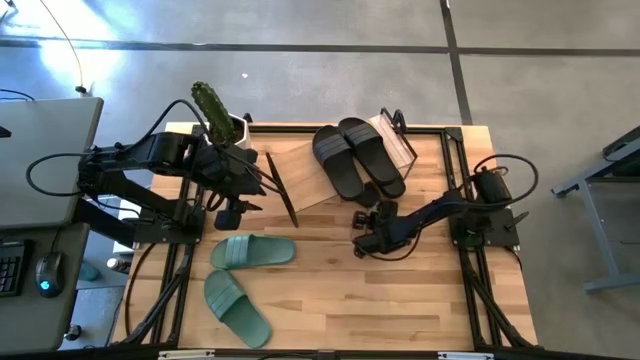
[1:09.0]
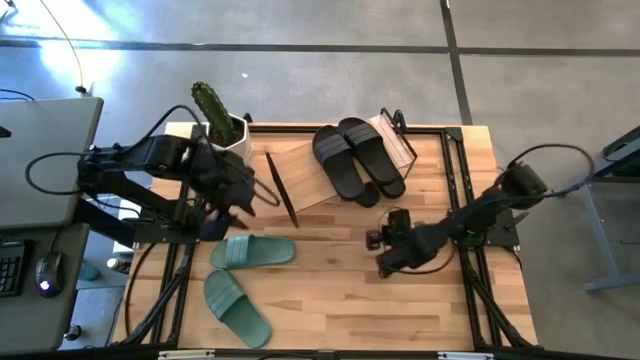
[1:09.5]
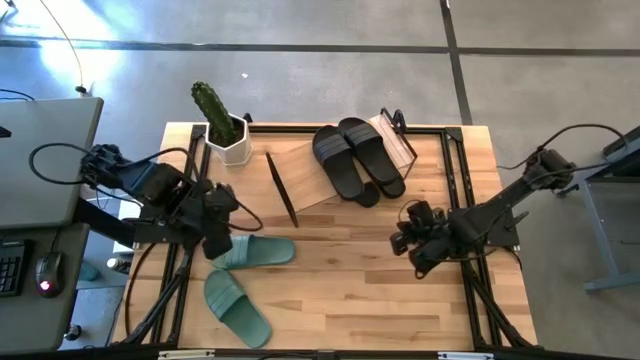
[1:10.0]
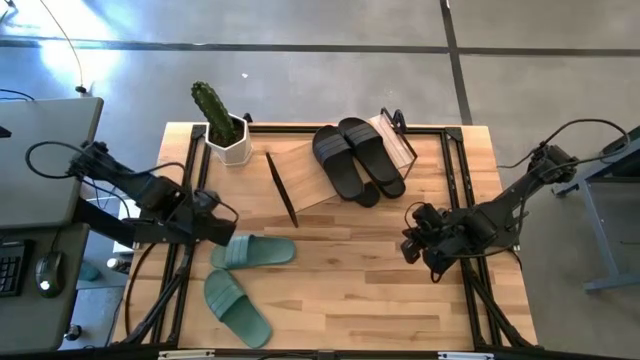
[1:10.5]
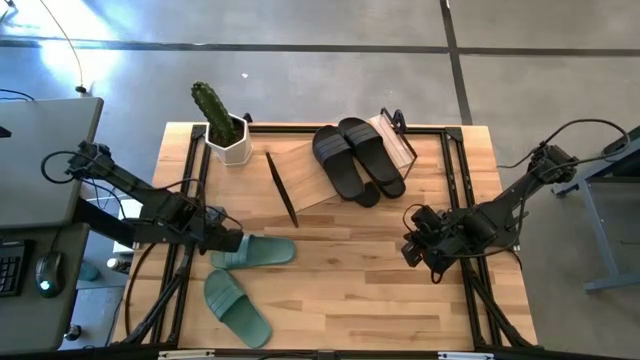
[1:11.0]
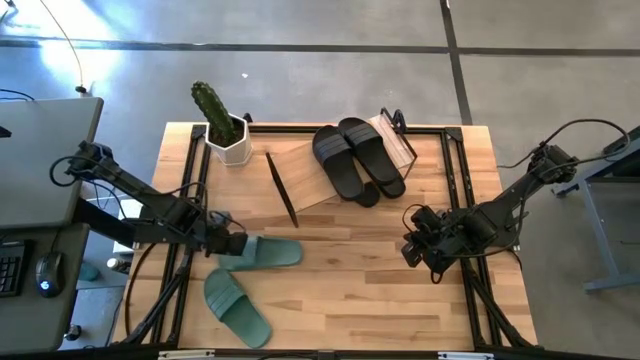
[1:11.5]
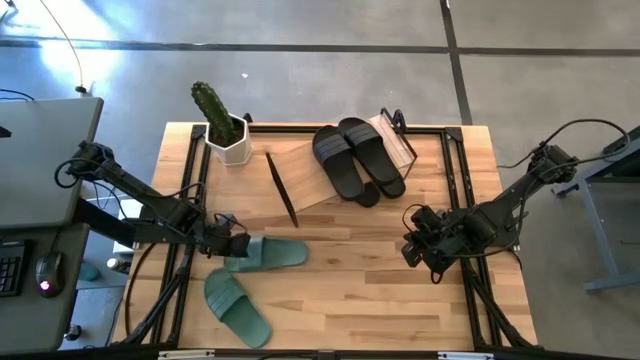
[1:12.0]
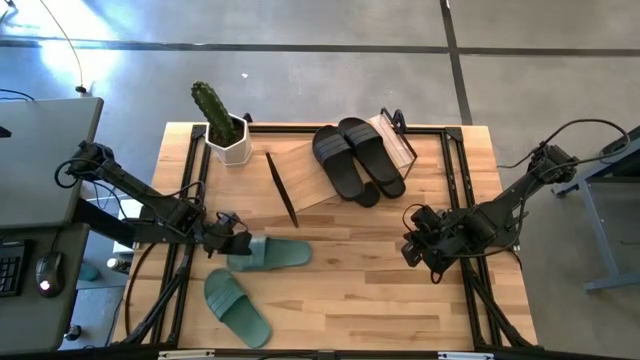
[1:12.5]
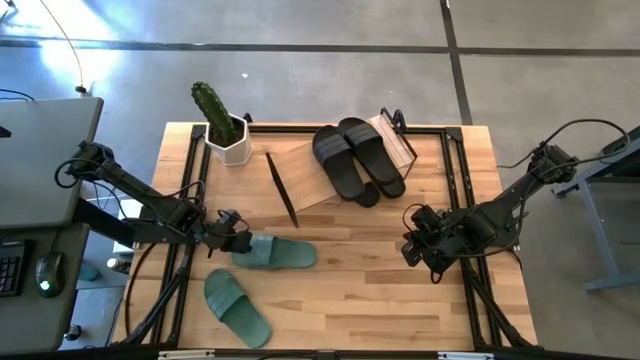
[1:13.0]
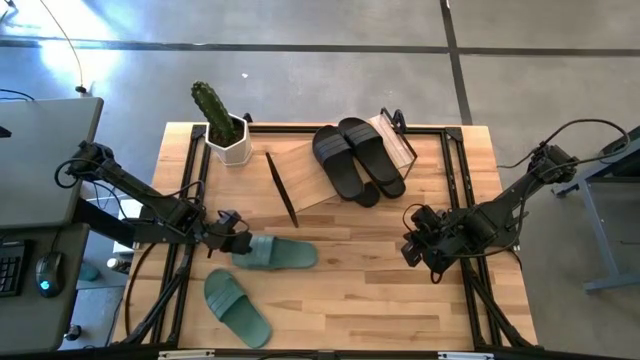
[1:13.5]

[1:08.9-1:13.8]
Task: Pick and place slides into the shelf
Put the green slipper under the shelf

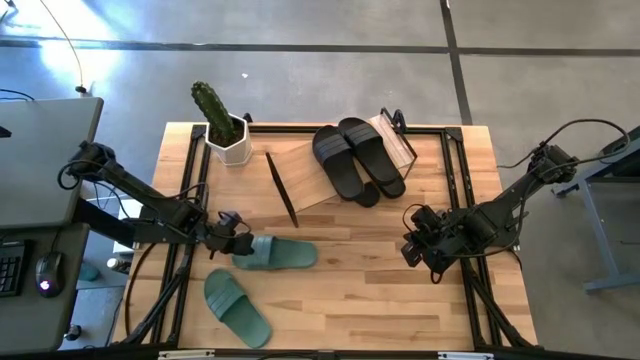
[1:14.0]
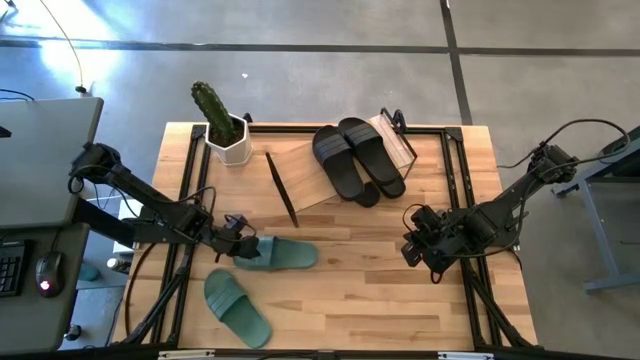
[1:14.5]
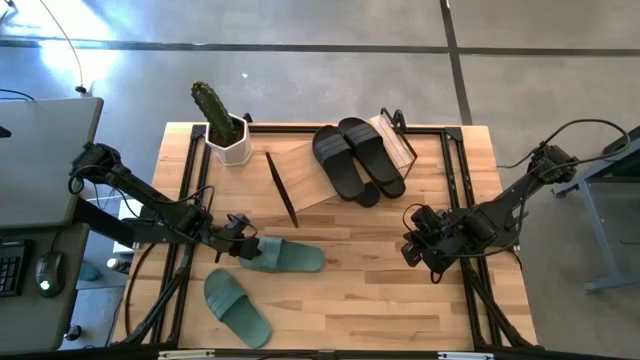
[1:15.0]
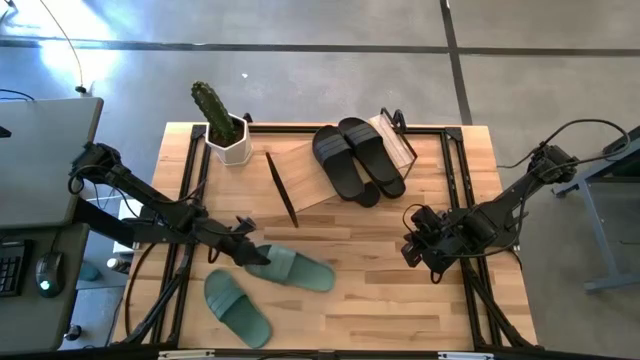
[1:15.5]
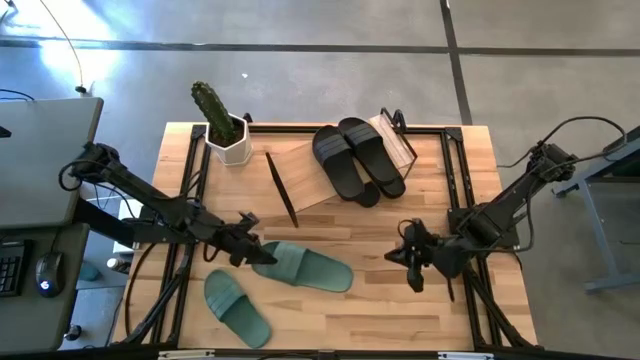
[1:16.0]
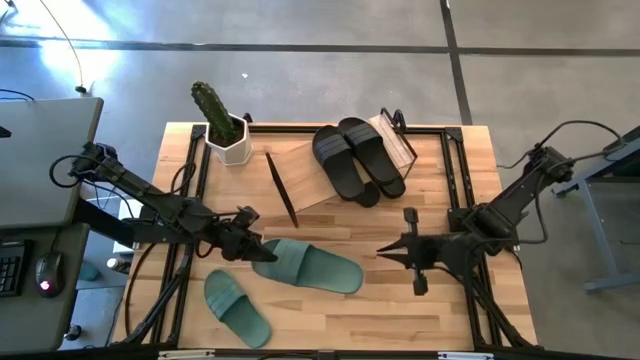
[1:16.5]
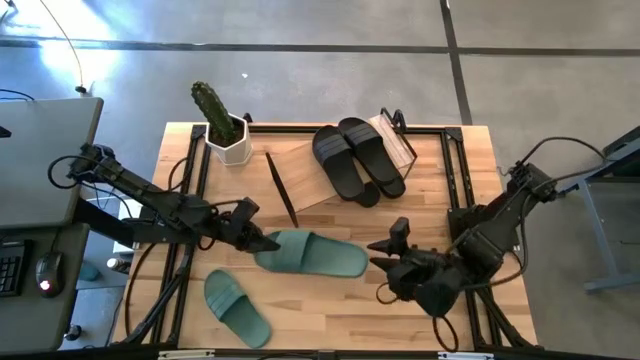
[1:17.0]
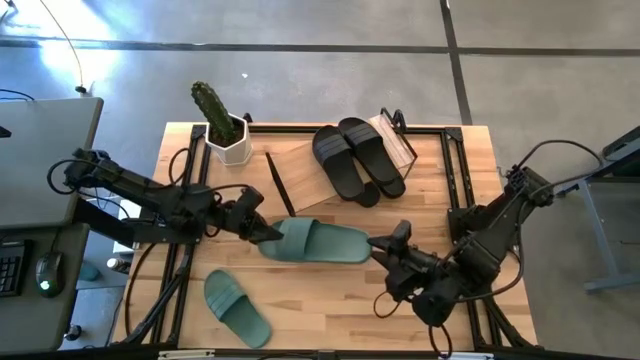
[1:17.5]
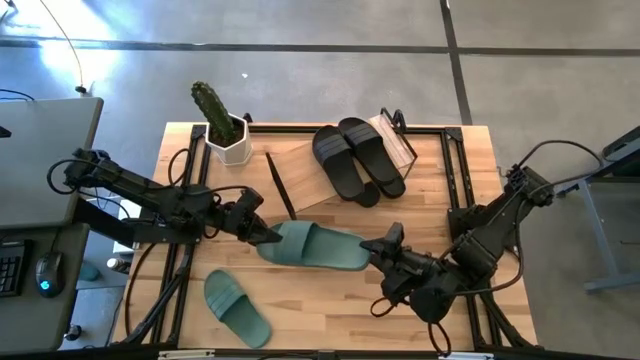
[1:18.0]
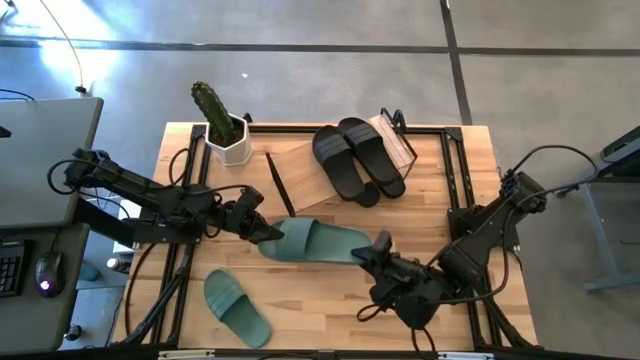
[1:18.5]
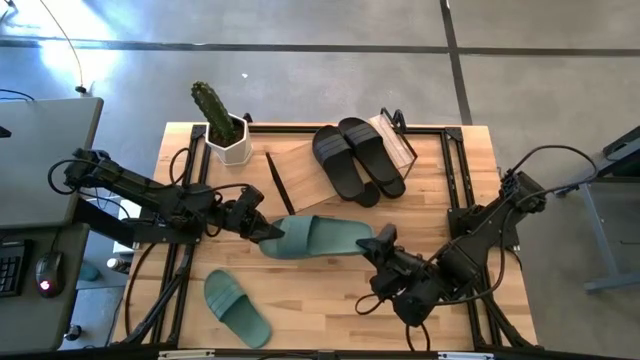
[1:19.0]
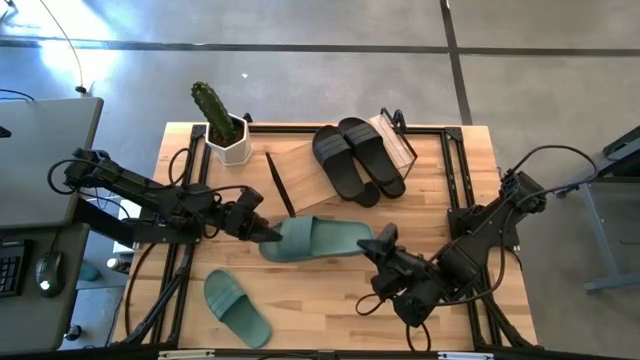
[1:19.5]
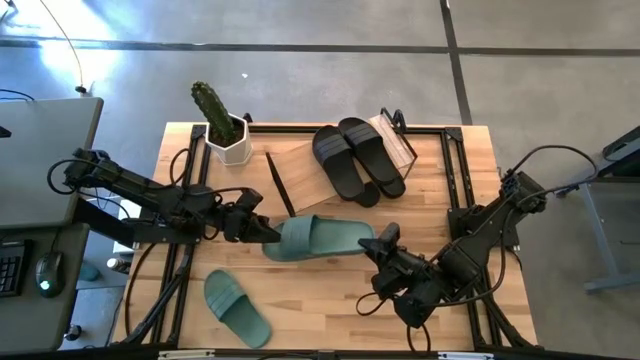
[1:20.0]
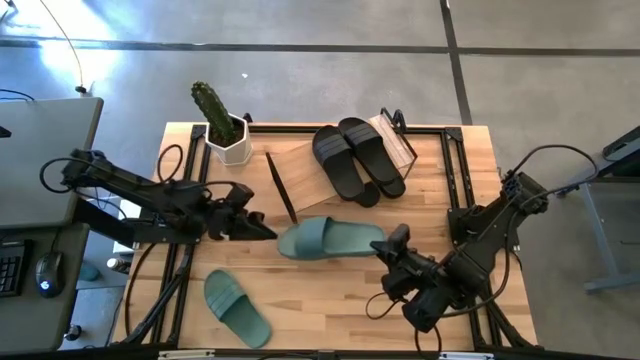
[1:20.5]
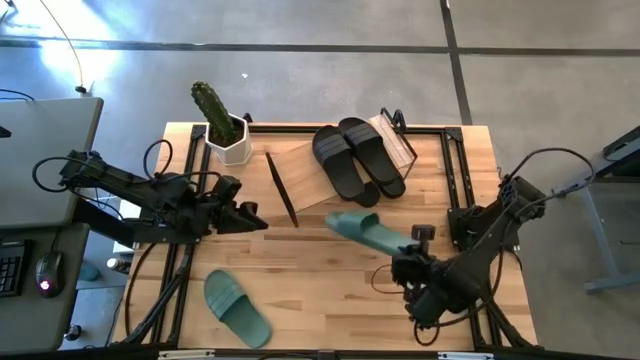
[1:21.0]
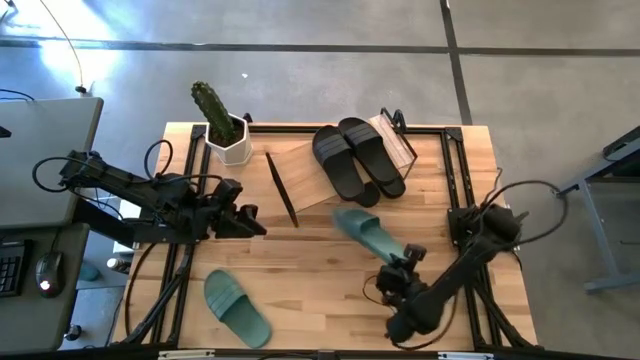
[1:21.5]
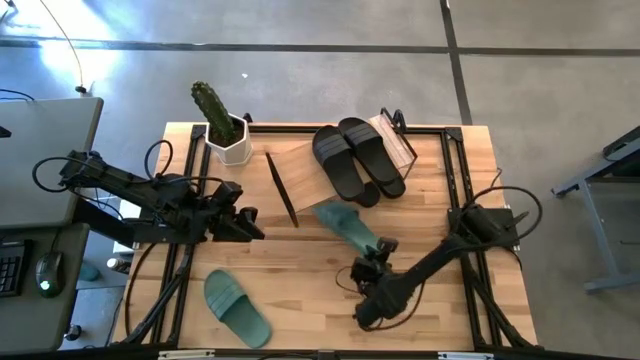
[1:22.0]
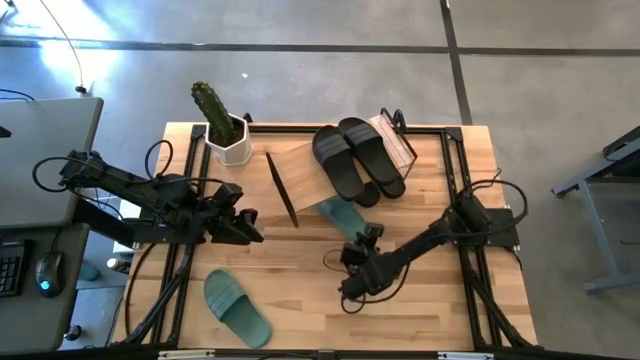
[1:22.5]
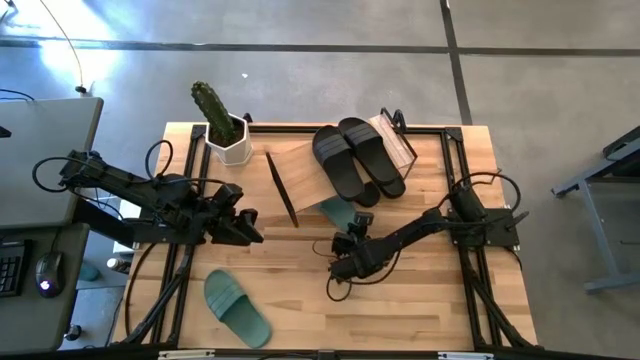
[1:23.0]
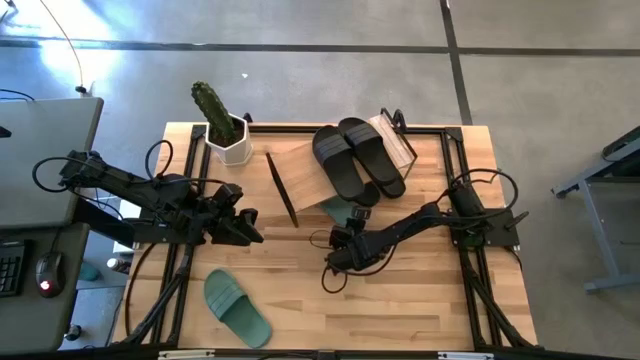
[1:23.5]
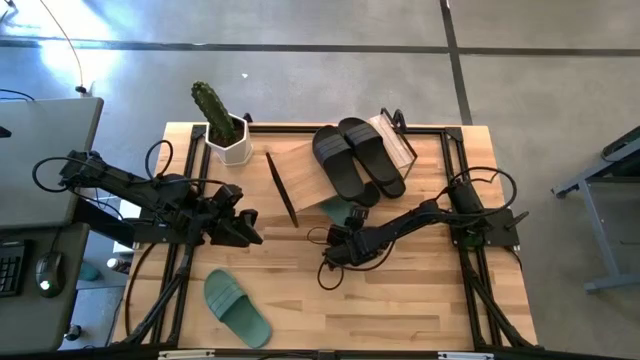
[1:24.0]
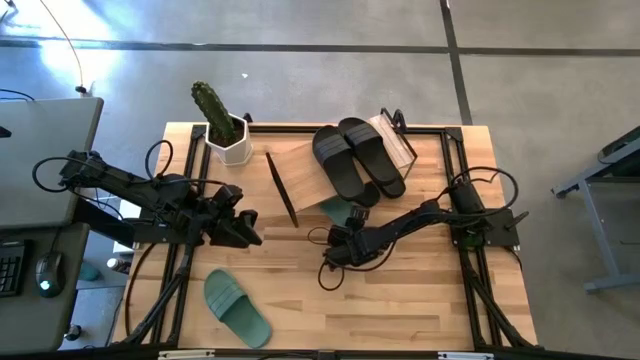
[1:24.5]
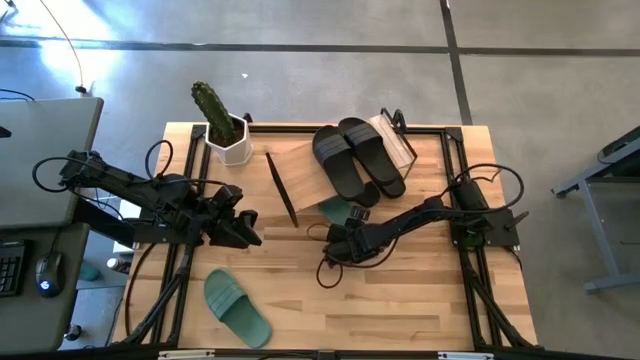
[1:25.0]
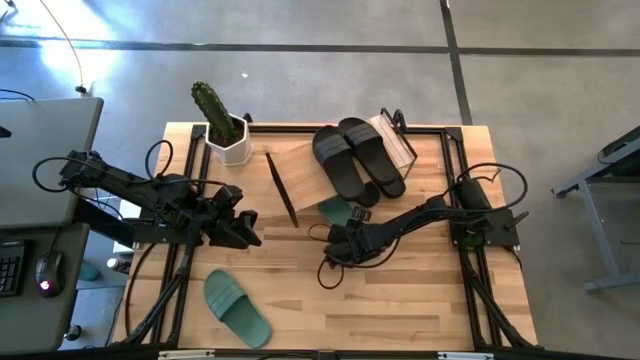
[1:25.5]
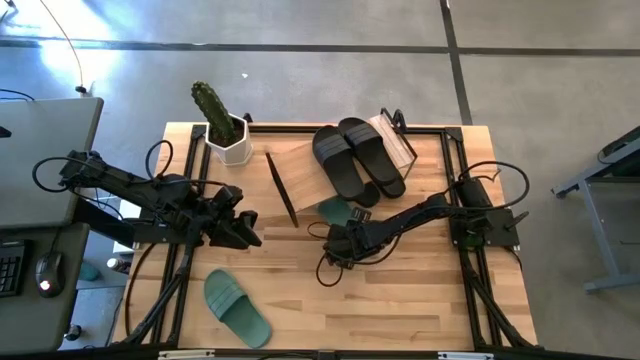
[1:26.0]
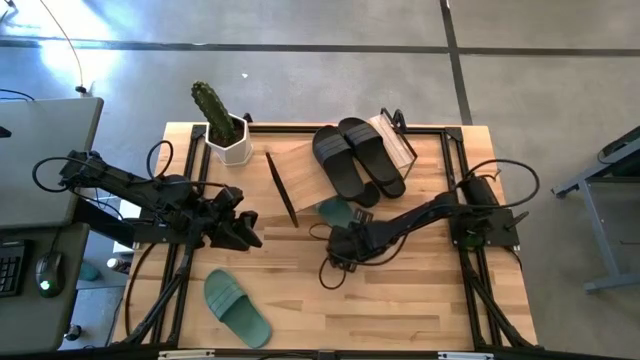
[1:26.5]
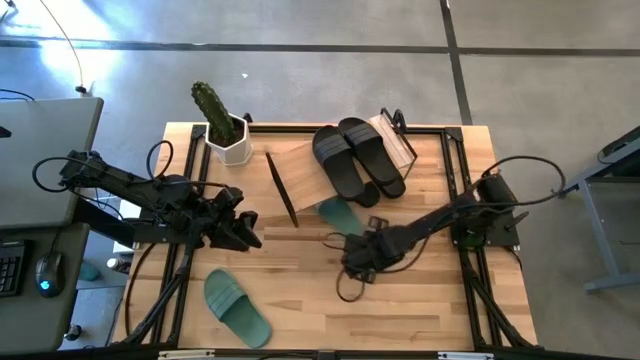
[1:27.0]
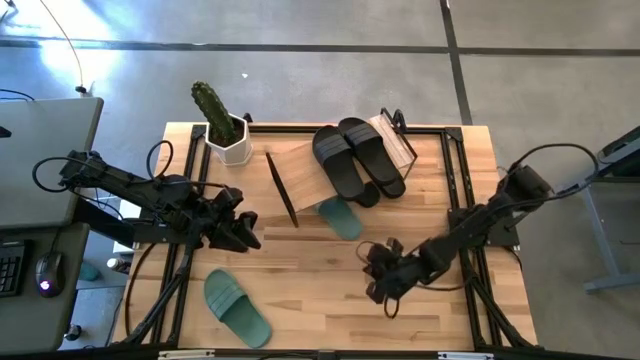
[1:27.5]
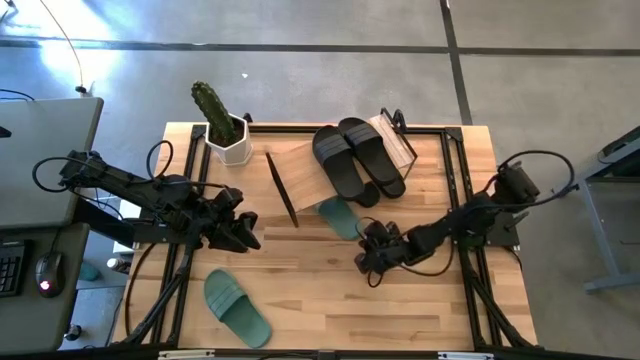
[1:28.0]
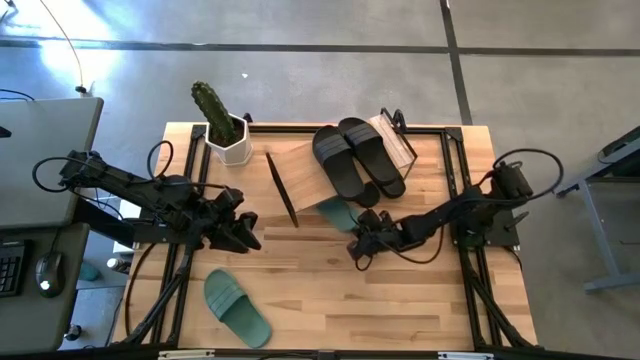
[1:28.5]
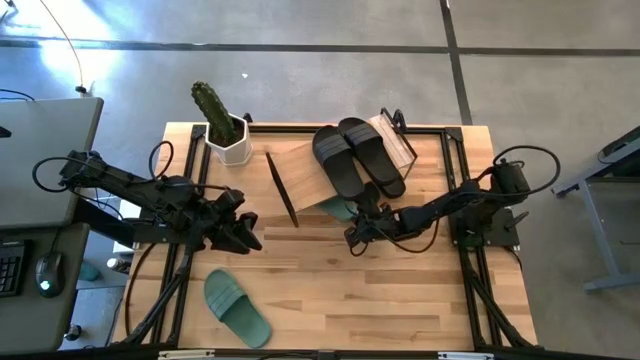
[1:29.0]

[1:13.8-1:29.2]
Put the green slipper under the shelf
